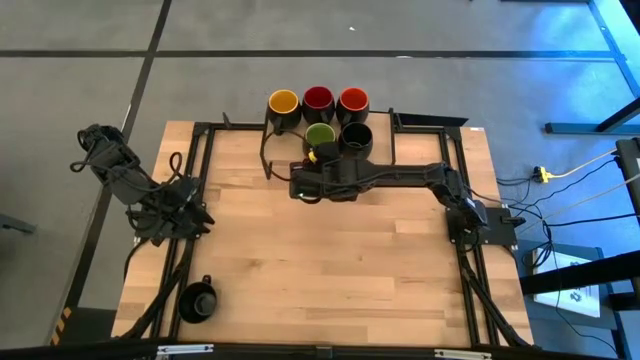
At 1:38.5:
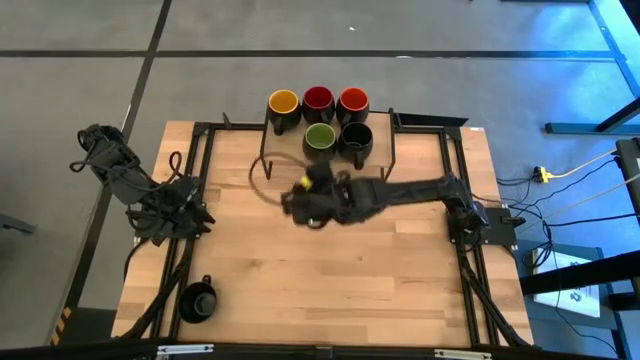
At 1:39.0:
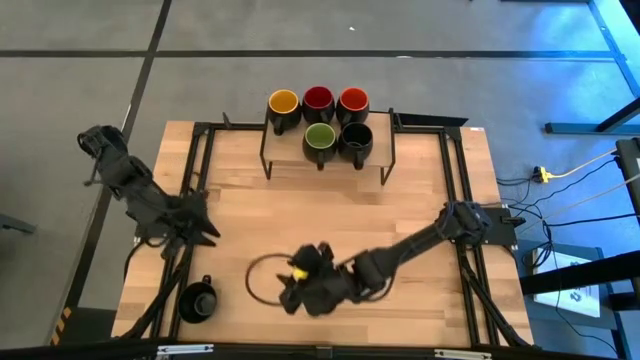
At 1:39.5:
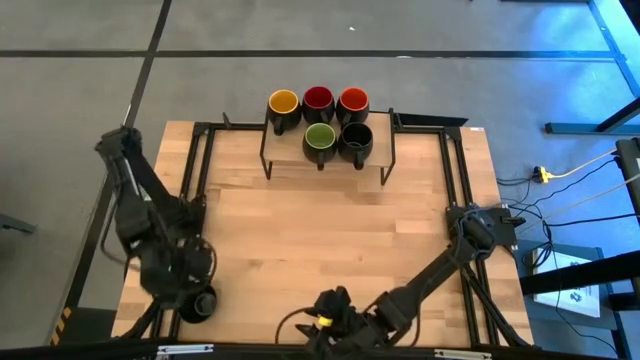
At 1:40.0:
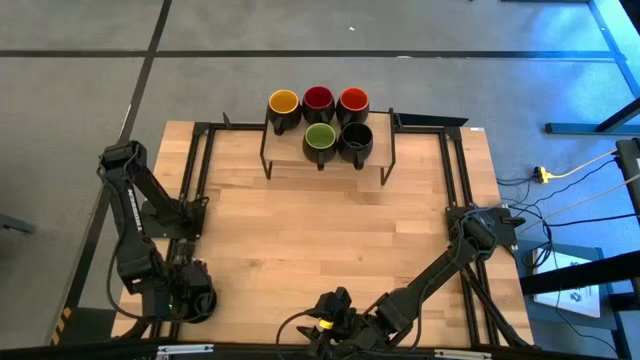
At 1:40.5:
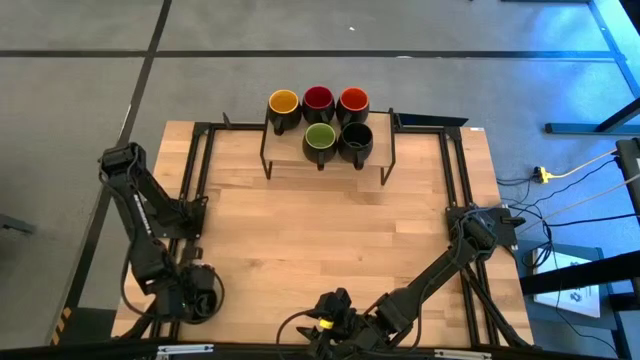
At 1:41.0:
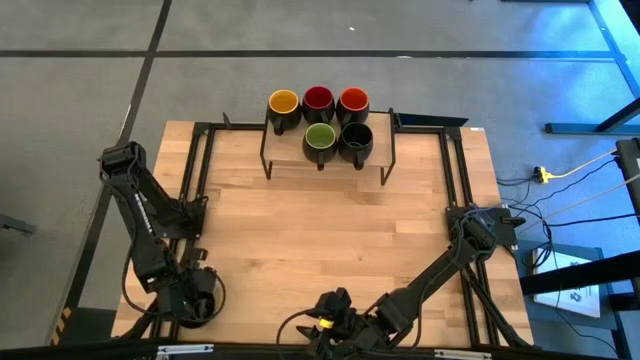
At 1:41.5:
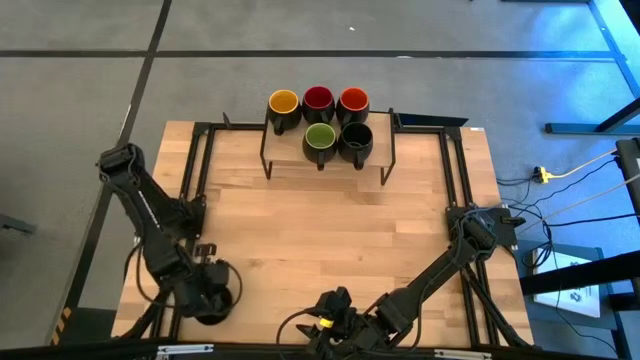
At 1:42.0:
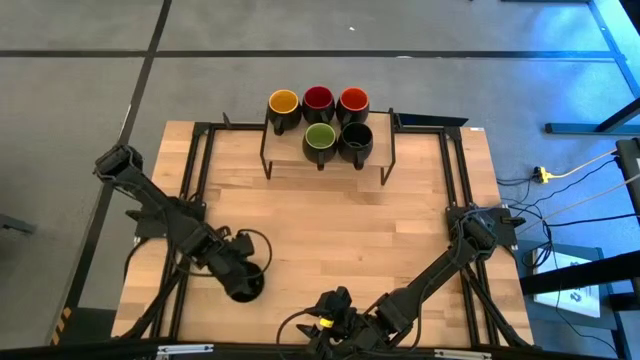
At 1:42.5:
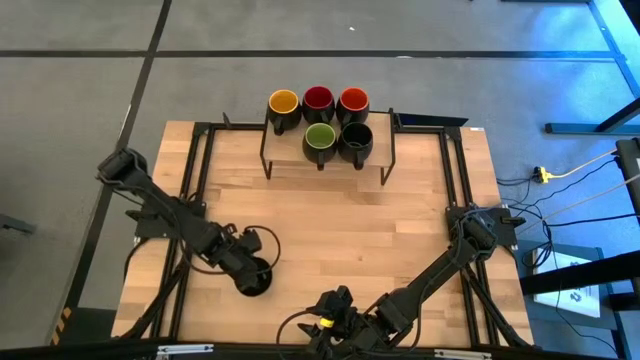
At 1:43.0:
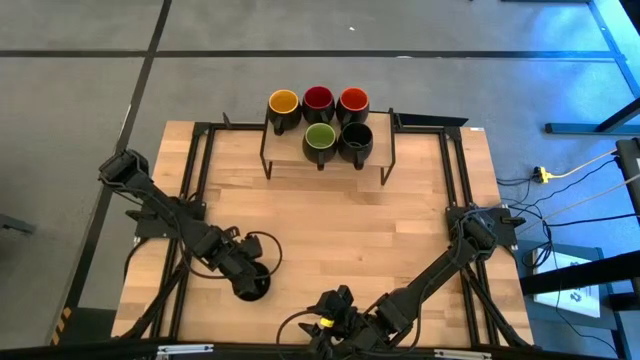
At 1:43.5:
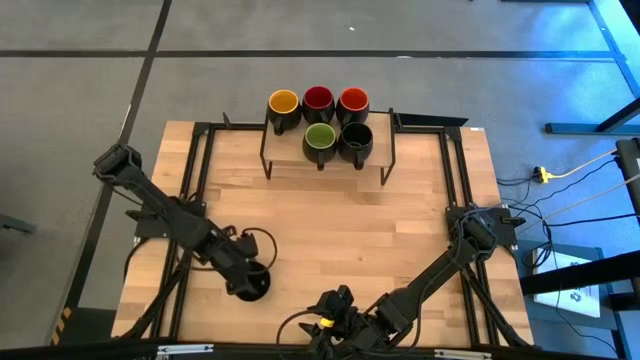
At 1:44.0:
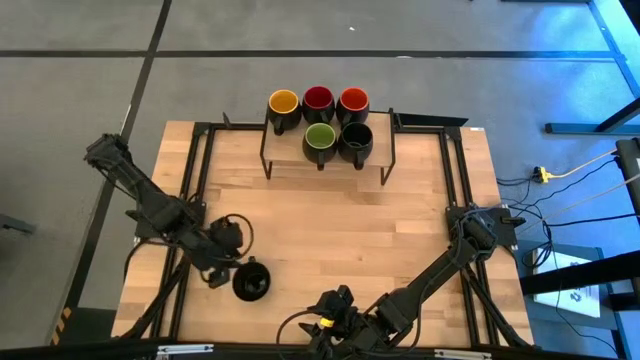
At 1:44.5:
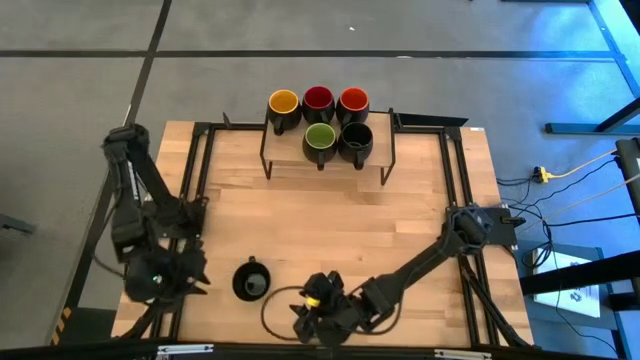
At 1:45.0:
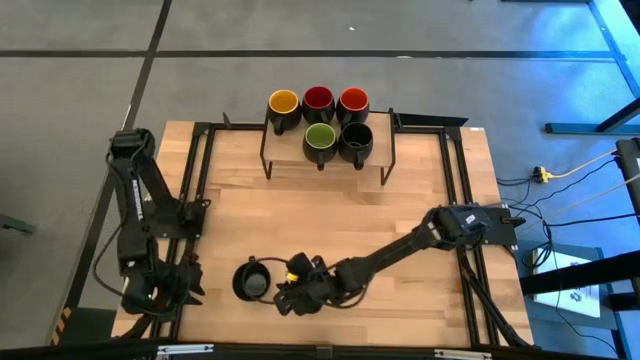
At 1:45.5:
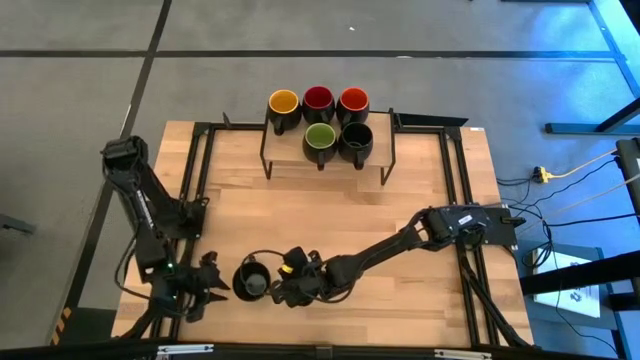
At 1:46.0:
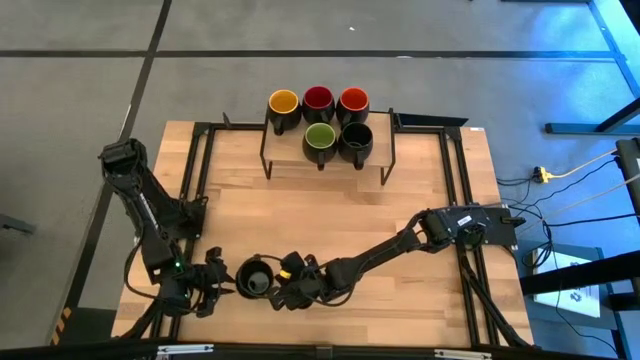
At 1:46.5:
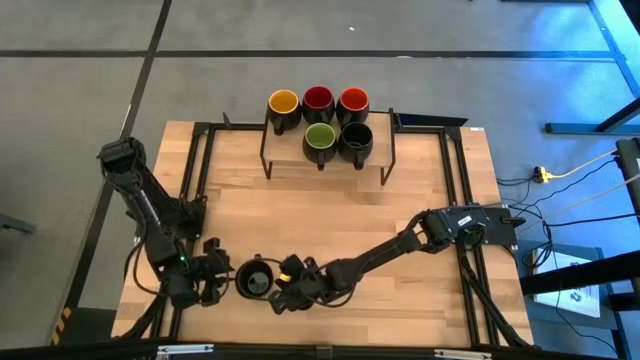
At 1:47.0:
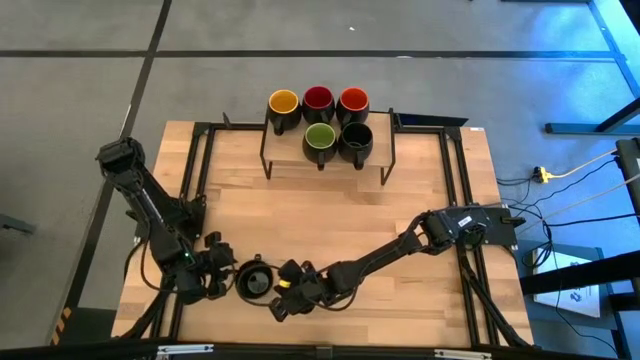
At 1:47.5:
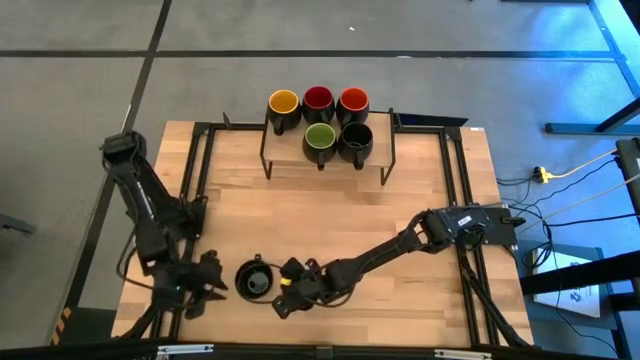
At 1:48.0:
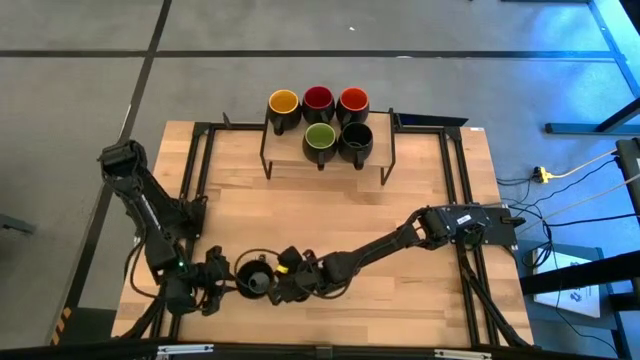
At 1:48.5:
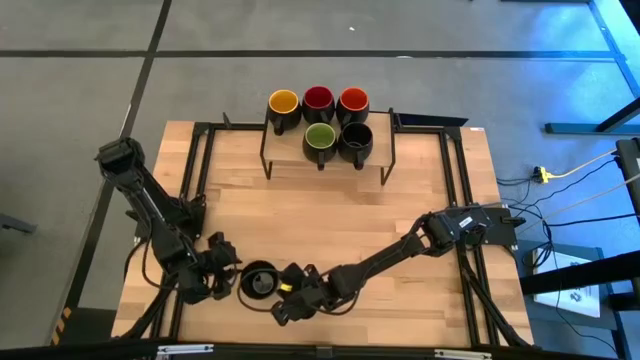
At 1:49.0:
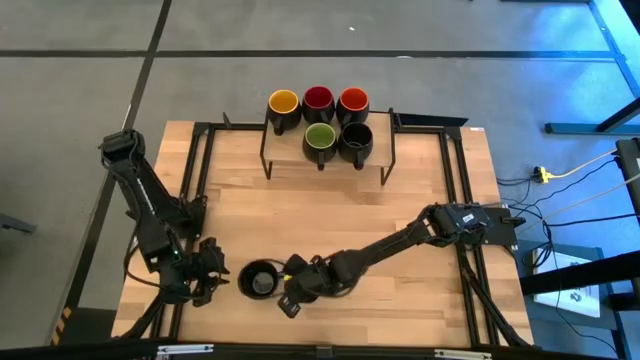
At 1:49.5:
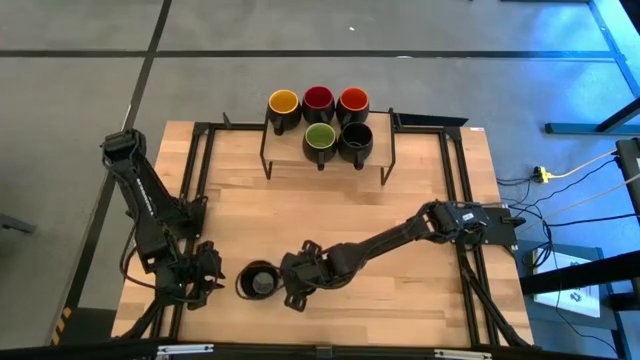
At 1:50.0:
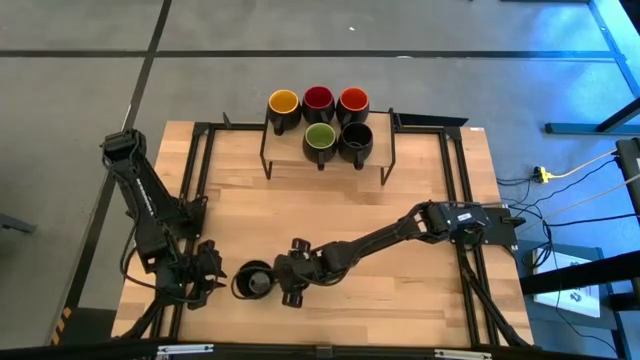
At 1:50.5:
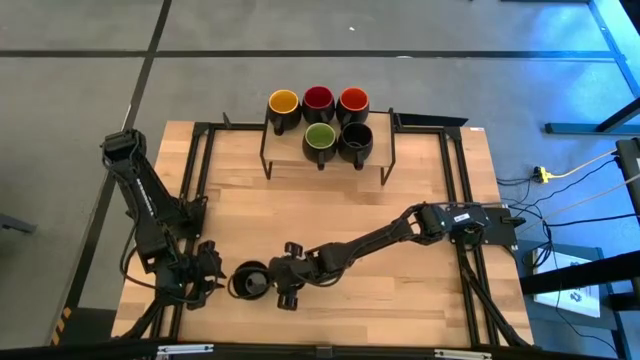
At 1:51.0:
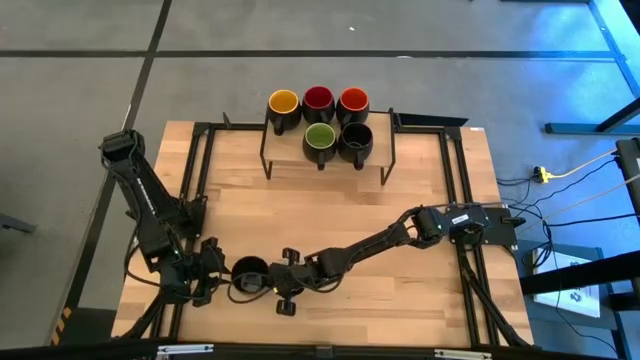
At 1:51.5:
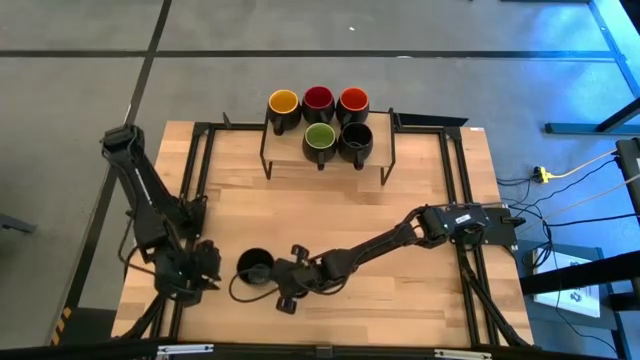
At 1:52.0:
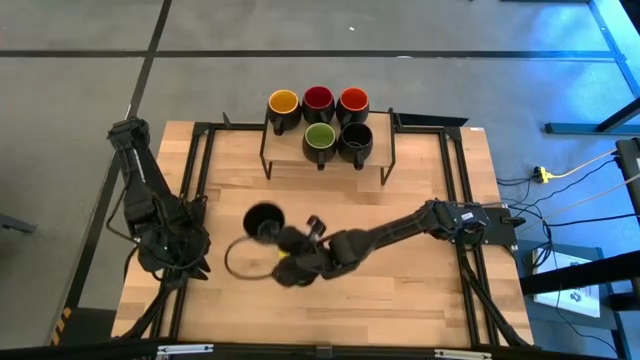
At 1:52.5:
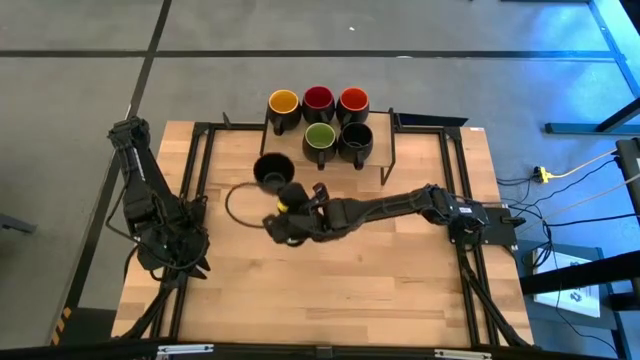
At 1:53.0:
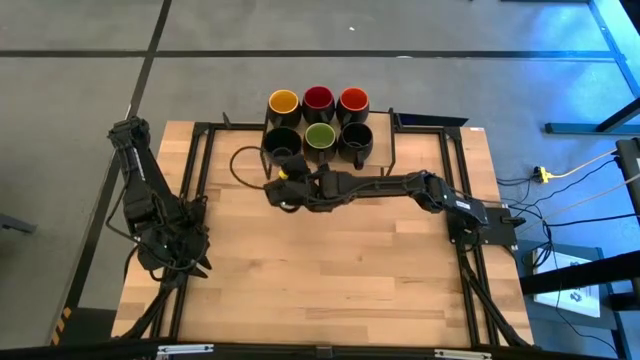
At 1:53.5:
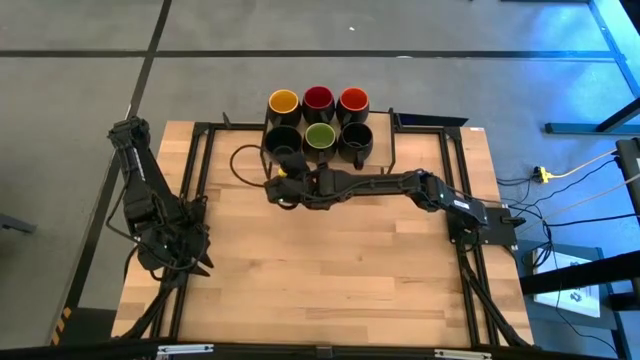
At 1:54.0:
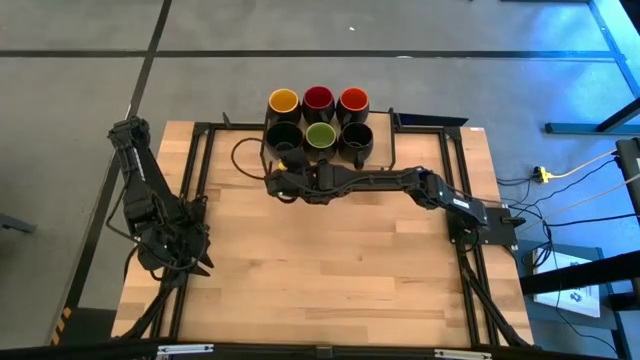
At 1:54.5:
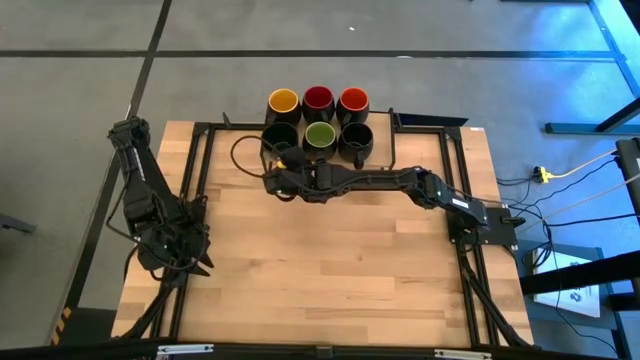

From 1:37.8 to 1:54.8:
Task: Place coffee mugs
Put the black mug on the shelf

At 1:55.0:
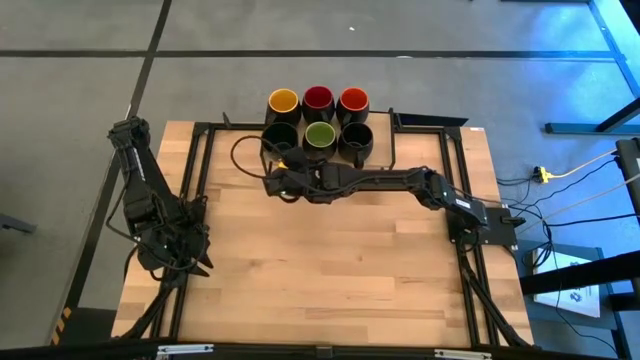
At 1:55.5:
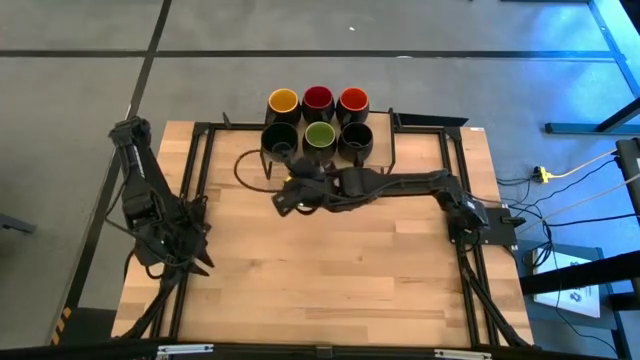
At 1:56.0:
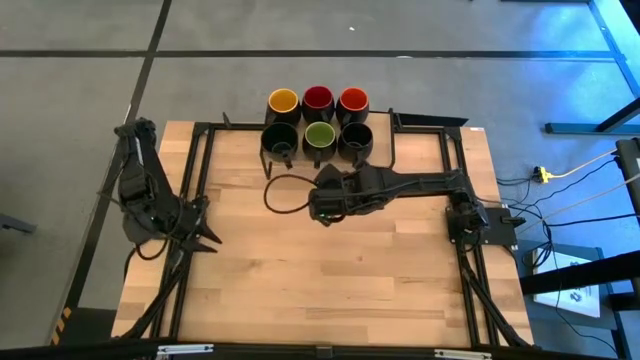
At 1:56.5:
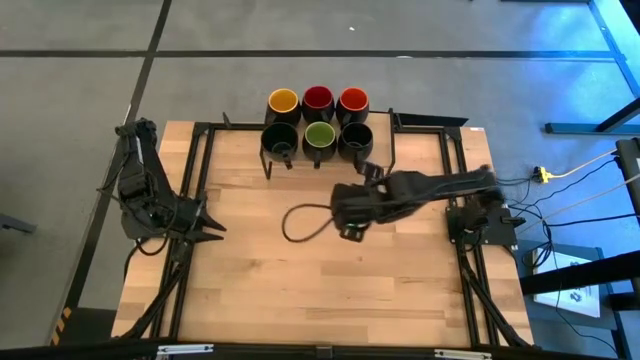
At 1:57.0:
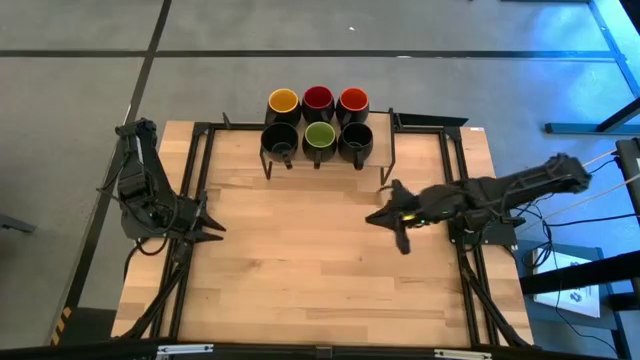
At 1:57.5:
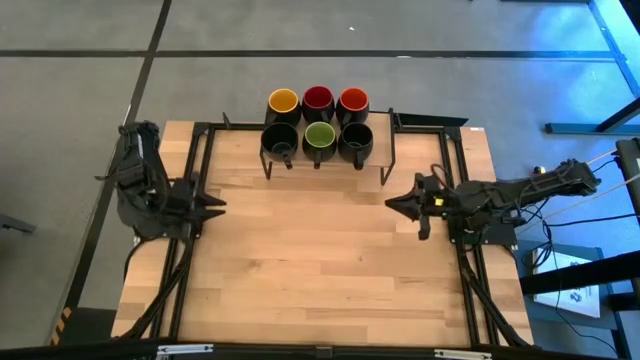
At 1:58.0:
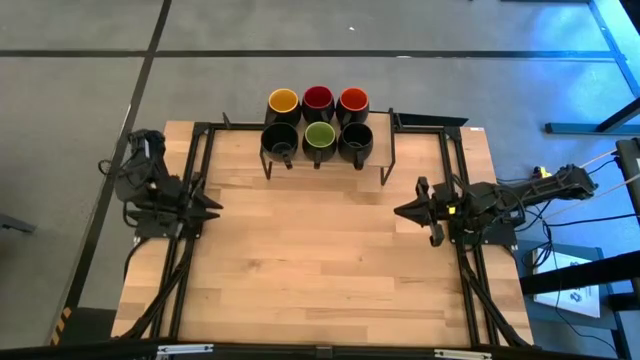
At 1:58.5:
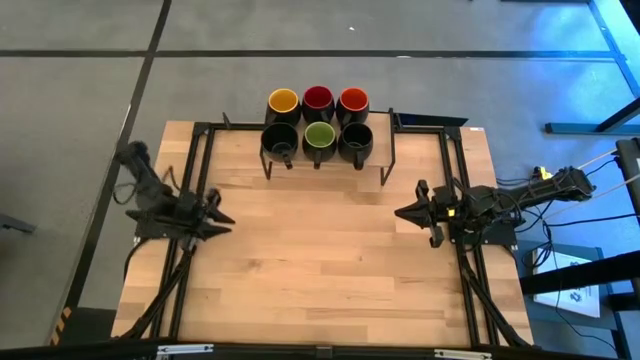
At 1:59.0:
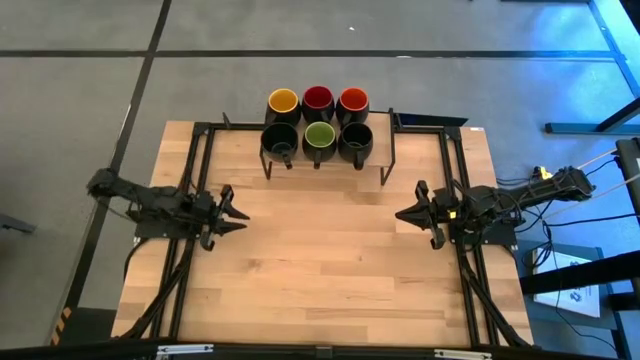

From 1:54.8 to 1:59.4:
Return to Home Position
